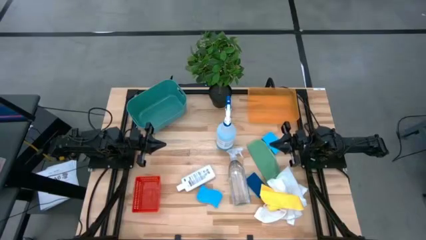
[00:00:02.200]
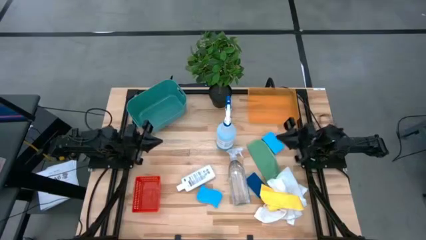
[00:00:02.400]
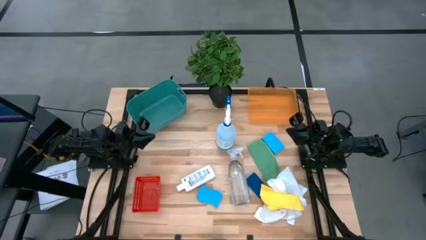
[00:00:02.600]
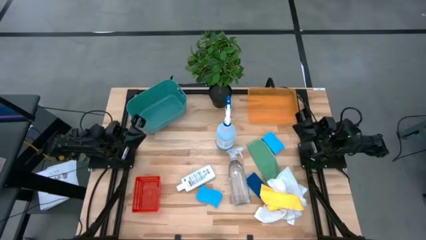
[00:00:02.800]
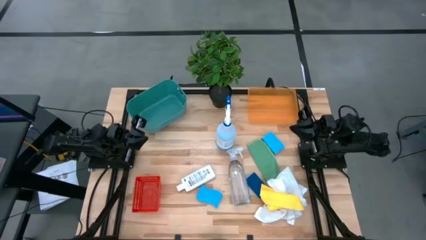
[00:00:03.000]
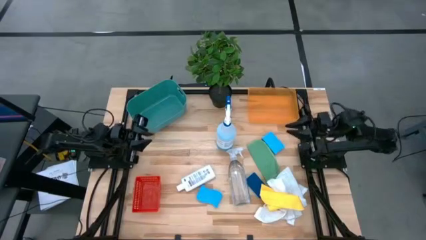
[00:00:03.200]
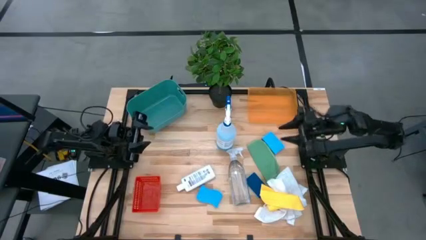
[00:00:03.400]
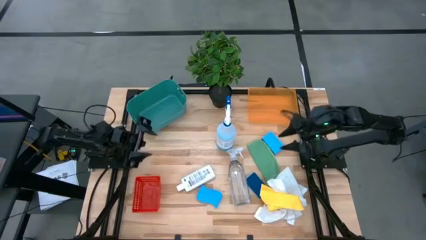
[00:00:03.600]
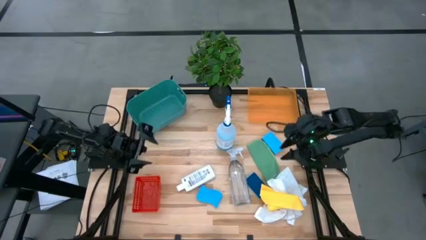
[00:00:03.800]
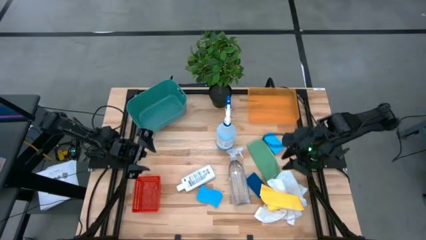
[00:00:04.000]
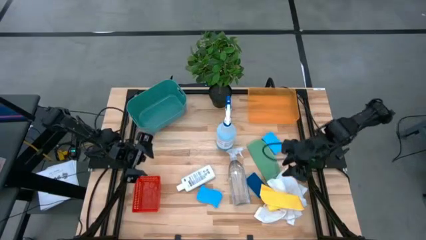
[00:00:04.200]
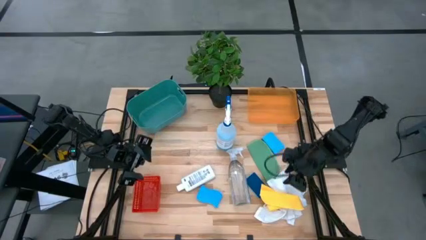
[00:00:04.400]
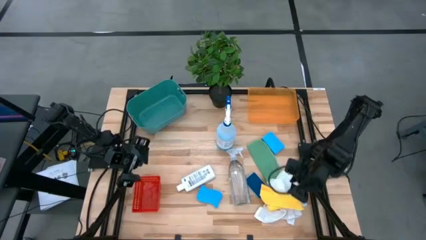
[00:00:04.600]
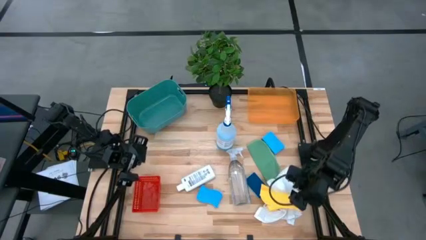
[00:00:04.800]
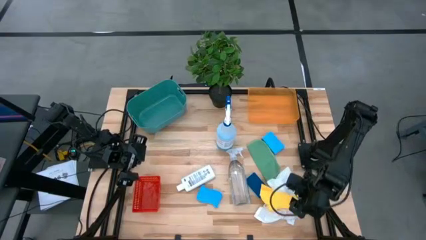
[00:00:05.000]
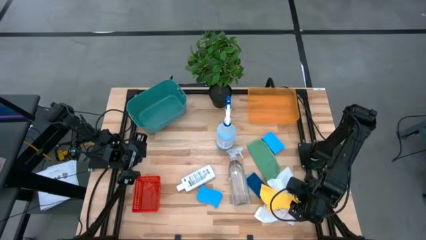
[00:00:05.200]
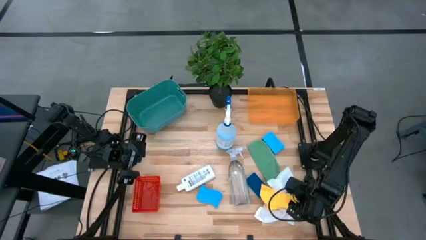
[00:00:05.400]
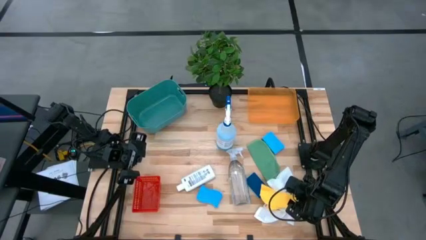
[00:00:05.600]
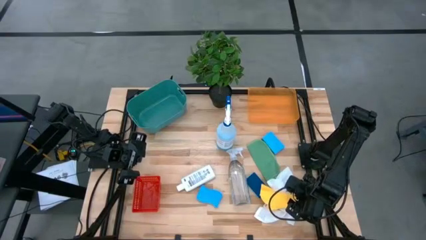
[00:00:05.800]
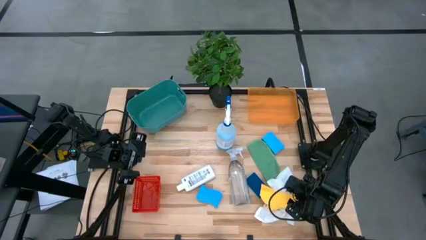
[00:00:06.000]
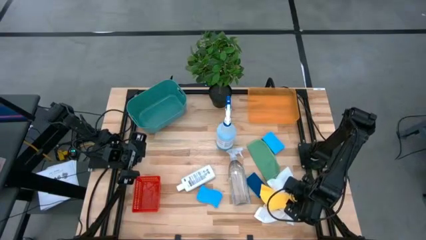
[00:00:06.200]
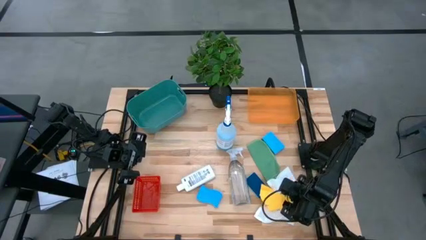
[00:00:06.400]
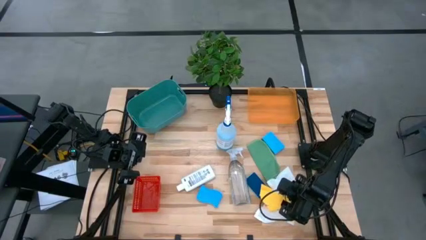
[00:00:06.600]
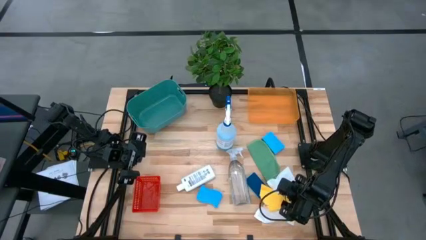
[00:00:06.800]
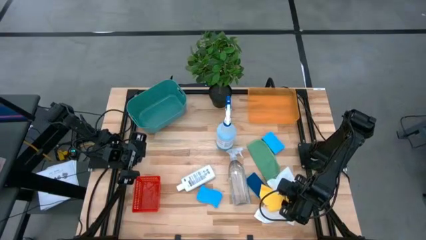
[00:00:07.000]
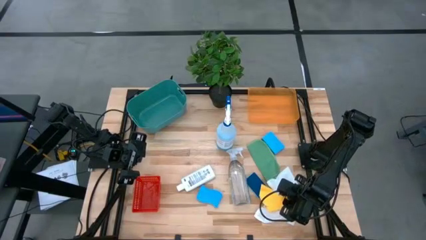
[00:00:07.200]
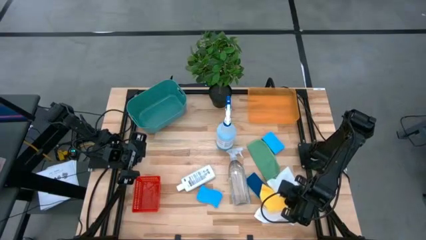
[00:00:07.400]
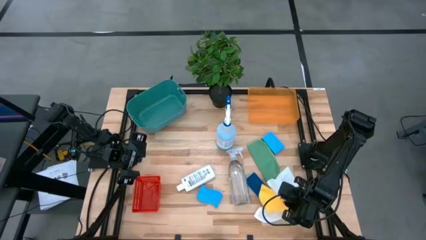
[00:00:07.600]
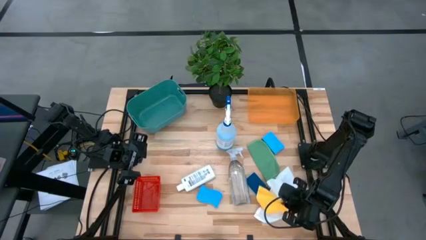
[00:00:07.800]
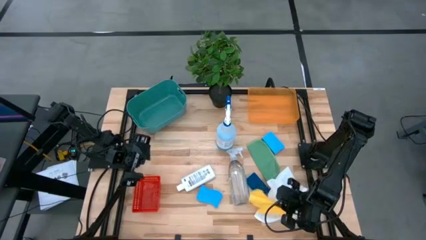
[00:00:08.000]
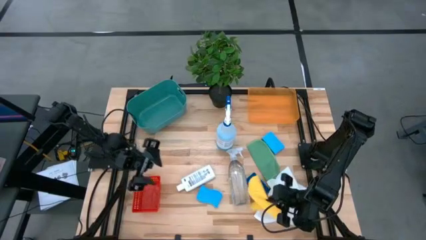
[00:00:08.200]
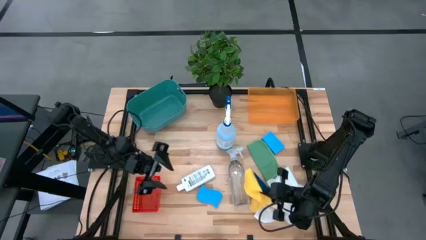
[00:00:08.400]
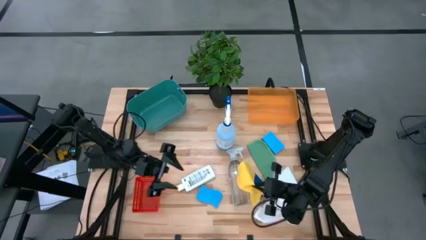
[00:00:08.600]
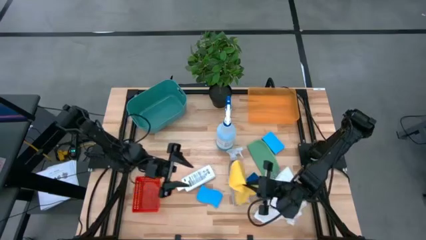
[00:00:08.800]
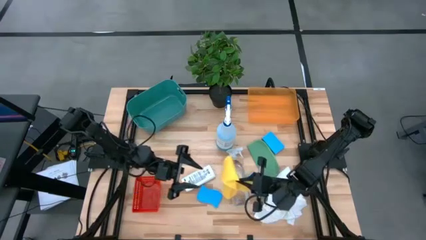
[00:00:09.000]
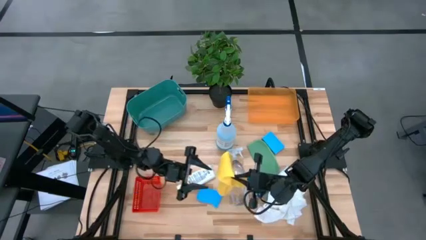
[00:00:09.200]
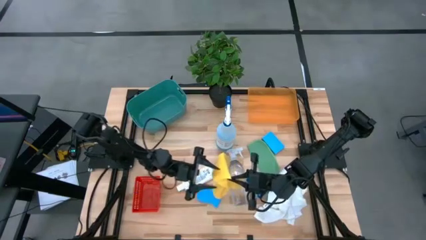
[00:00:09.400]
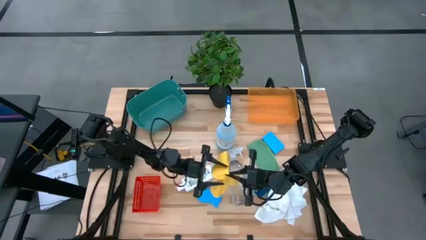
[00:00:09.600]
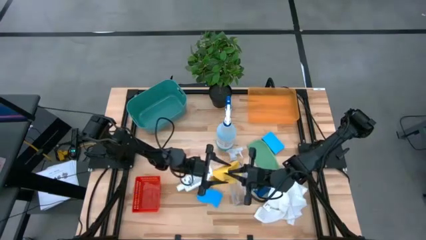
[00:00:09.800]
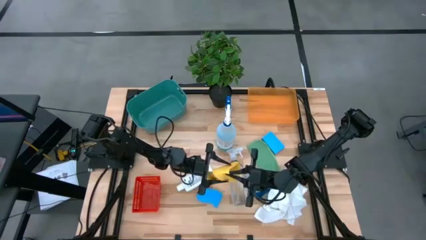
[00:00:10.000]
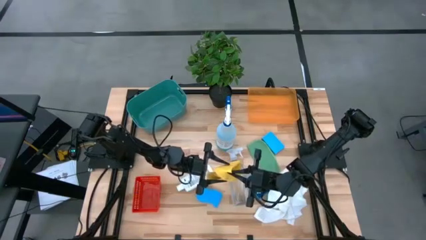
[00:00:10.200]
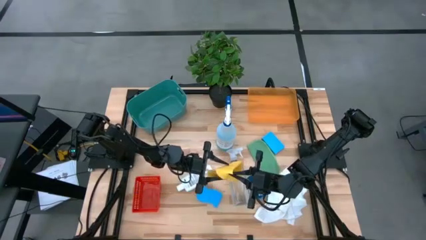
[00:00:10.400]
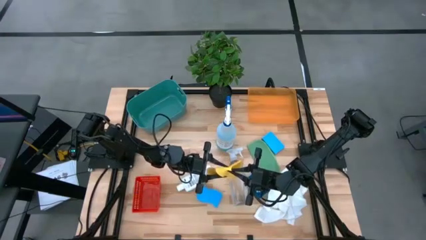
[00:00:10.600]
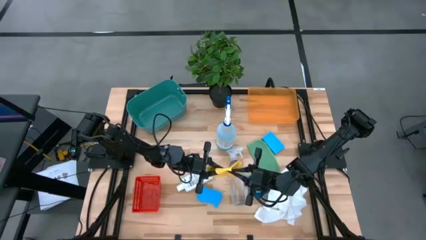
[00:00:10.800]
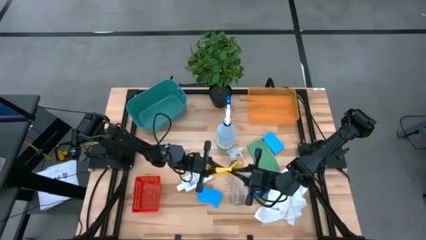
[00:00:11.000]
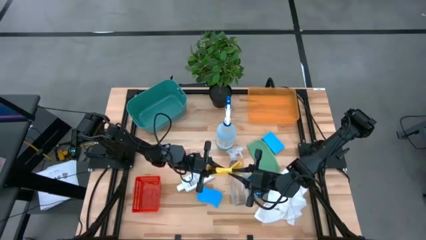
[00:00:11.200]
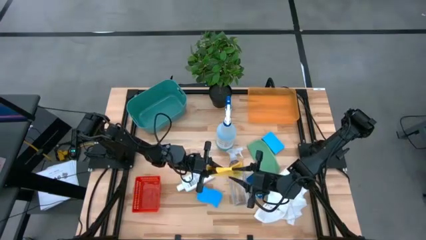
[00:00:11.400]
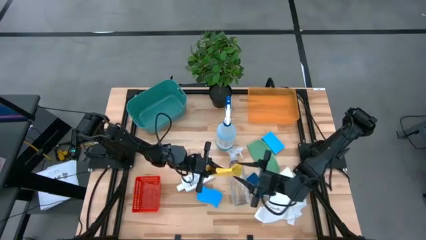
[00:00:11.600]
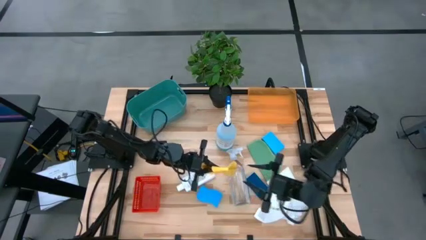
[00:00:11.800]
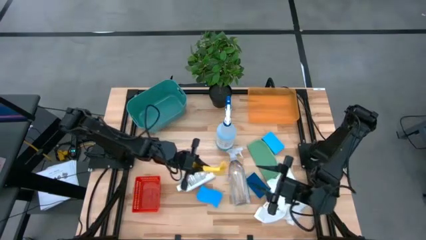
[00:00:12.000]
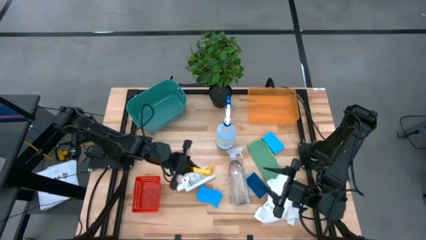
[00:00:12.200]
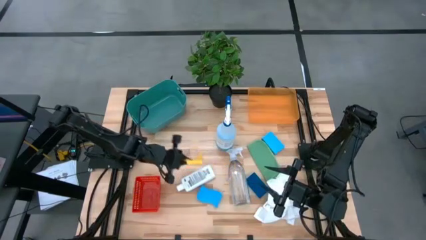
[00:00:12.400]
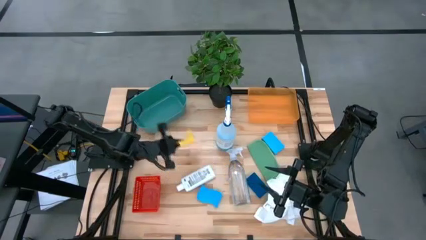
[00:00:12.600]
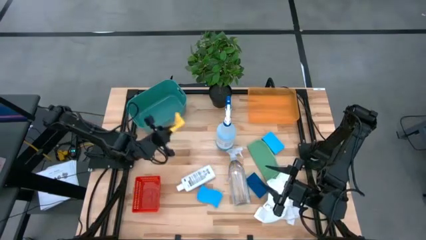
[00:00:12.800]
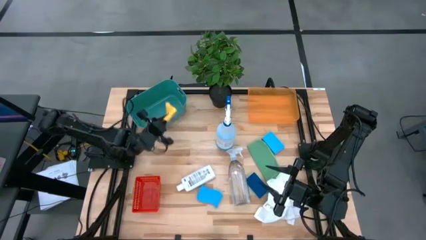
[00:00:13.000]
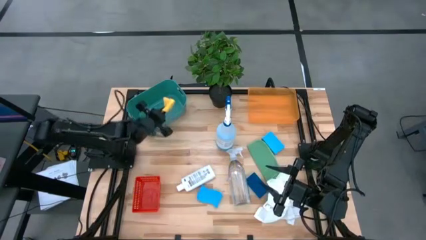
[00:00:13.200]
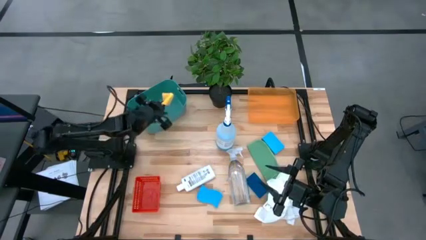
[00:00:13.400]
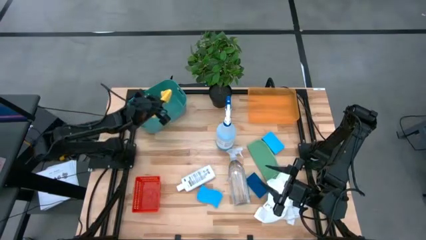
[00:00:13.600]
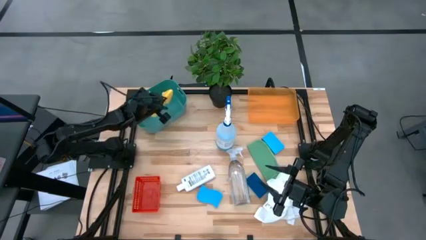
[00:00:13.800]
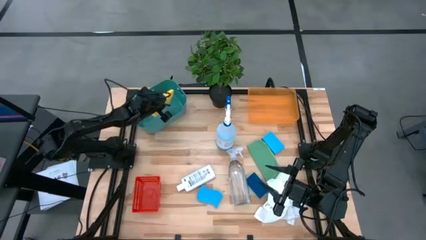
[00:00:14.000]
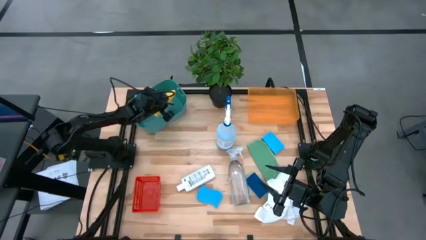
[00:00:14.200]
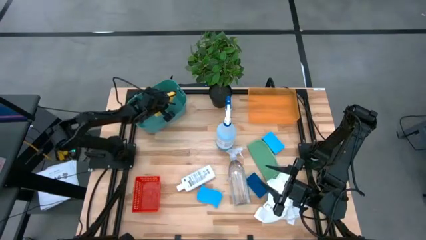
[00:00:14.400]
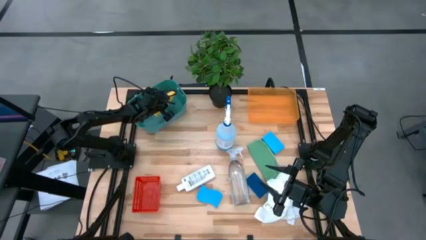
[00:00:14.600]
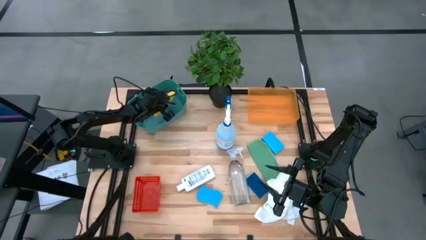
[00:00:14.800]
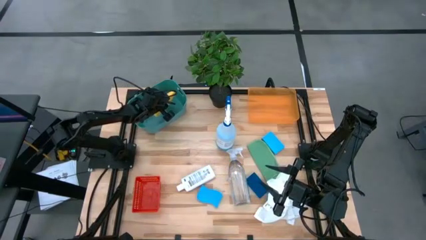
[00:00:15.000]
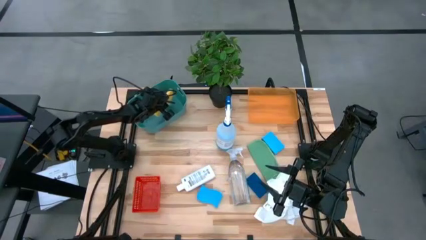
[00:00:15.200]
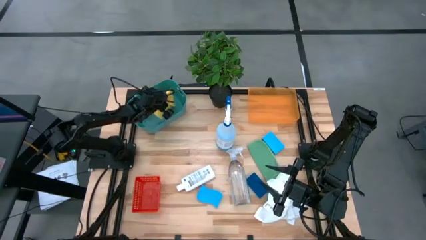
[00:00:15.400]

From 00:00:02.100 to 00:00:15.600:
Task: Pick & Place Kitchen Items
Put the yellow towel into the green bin
